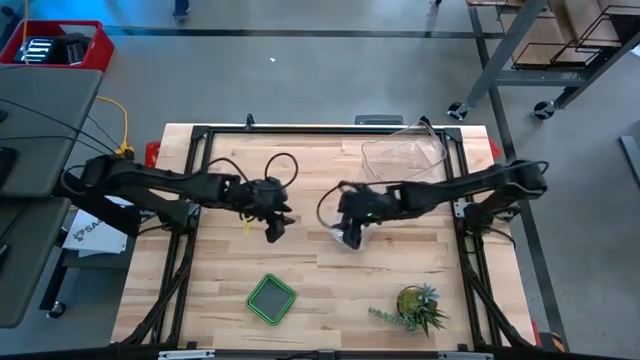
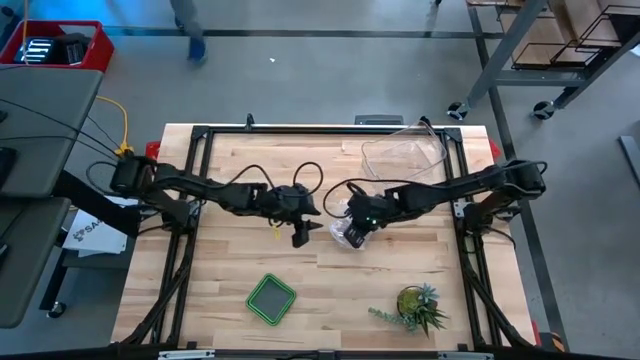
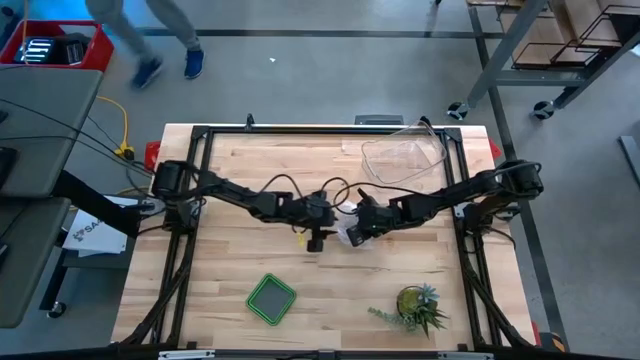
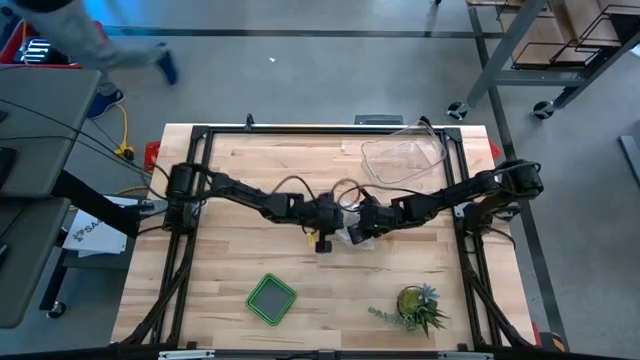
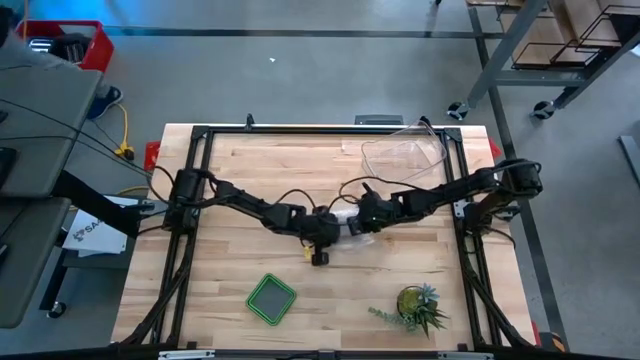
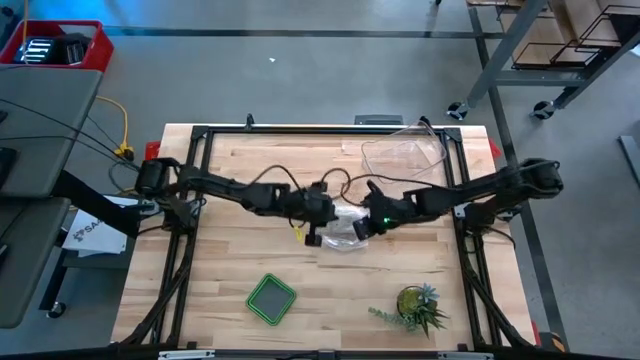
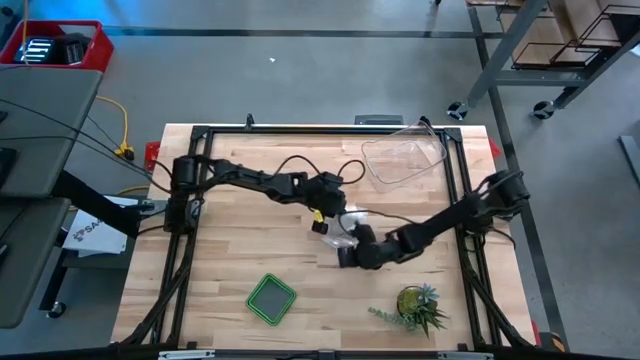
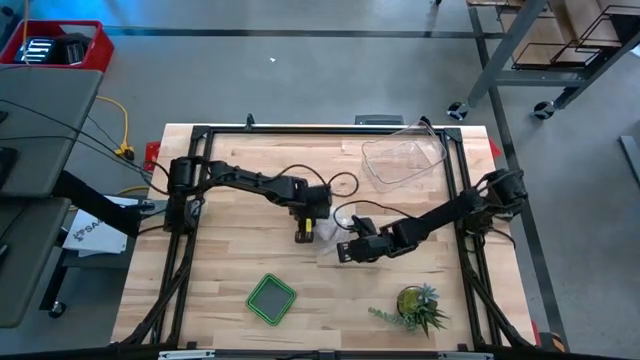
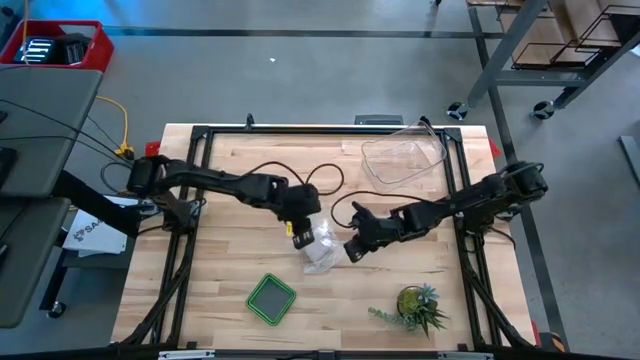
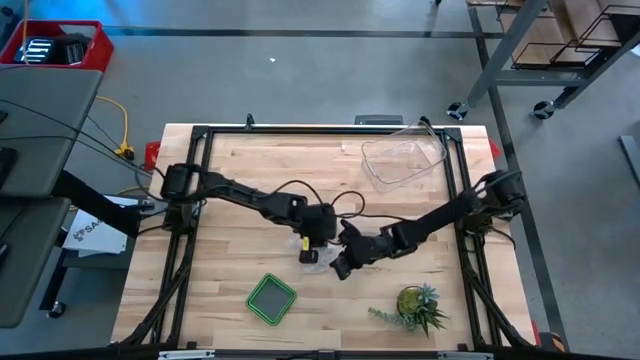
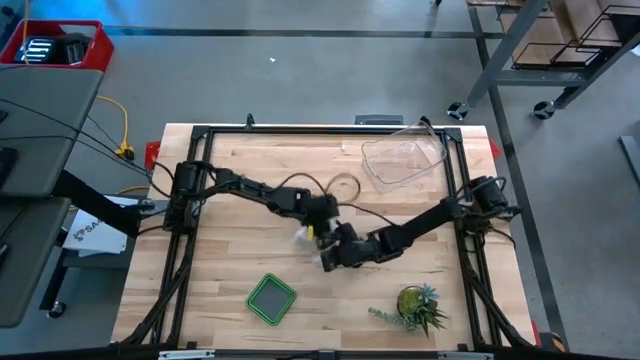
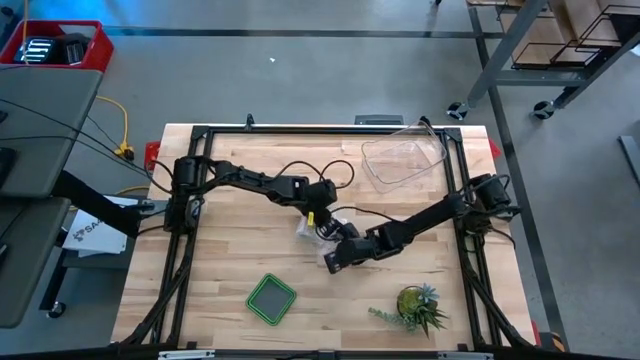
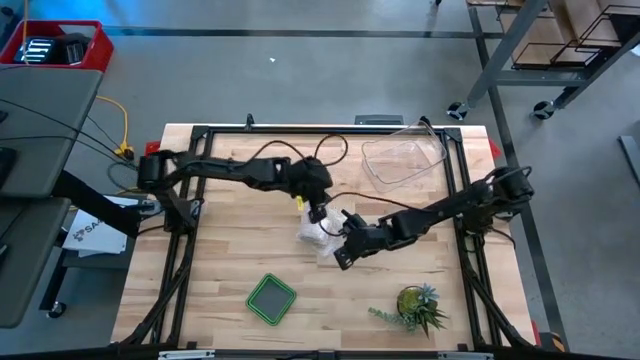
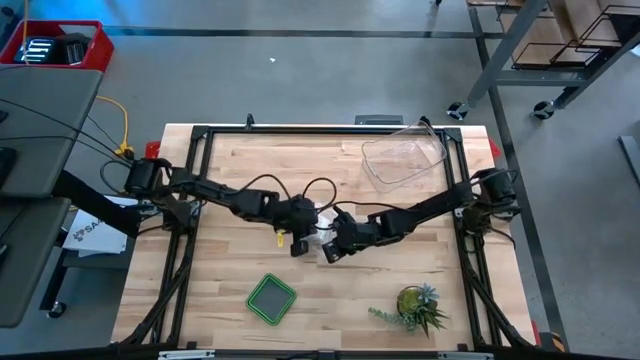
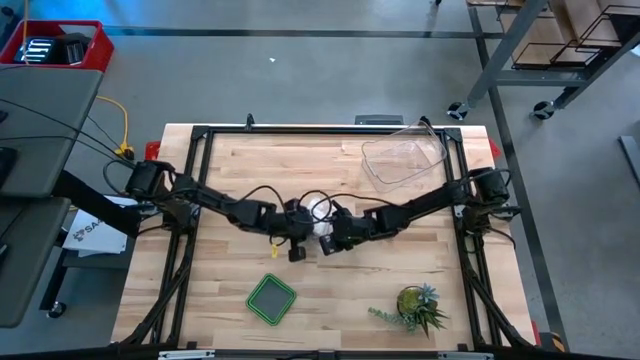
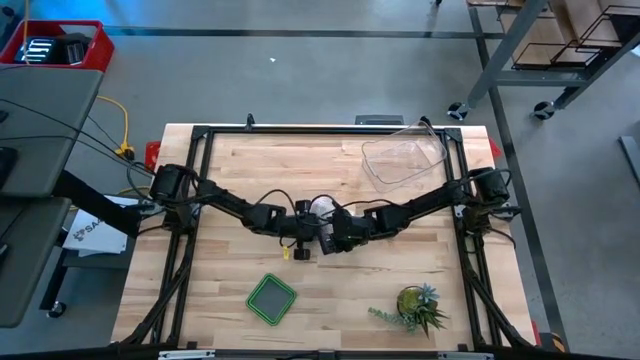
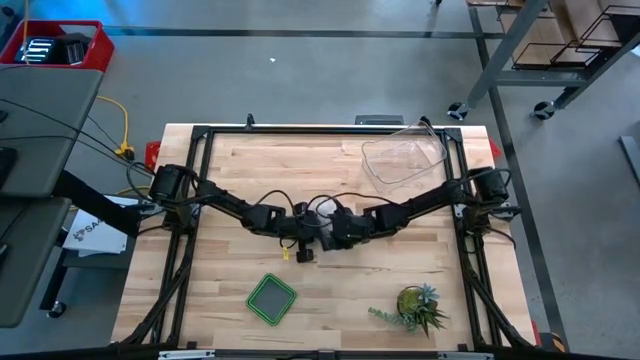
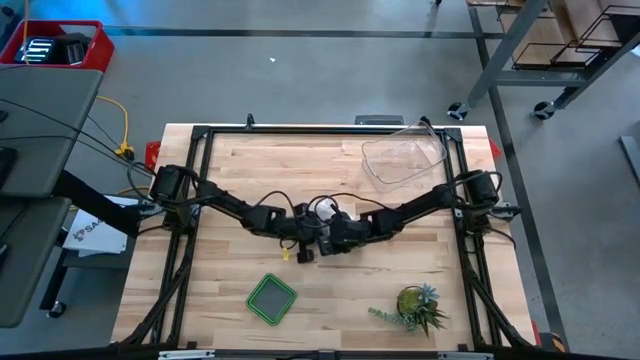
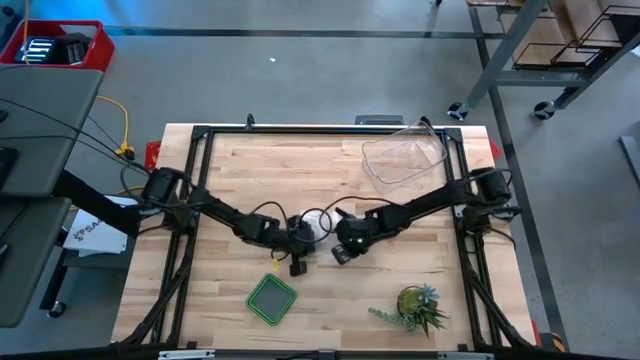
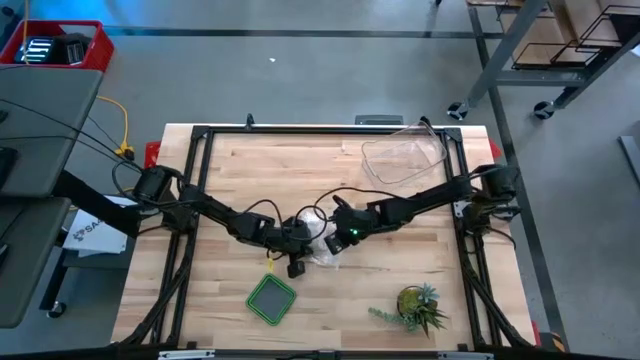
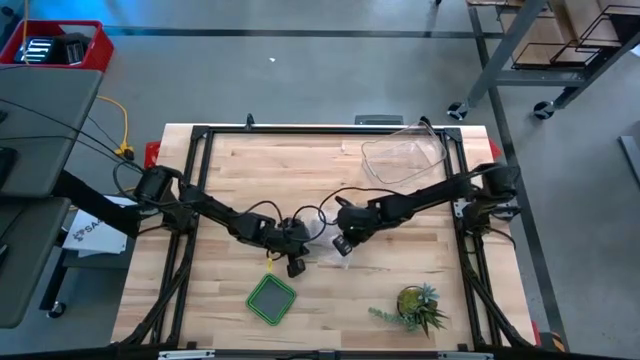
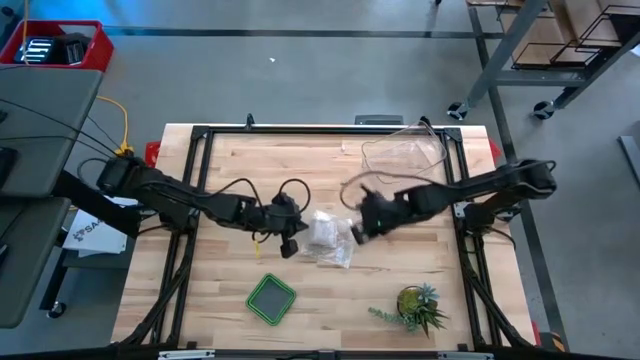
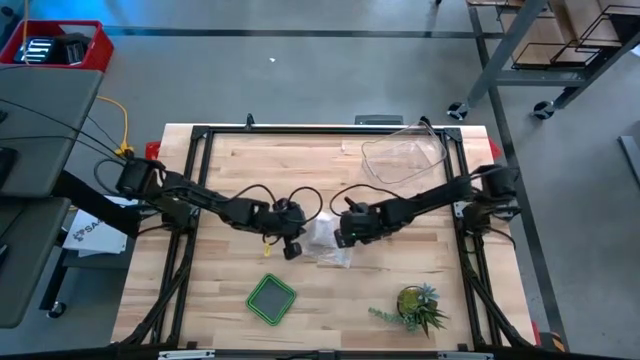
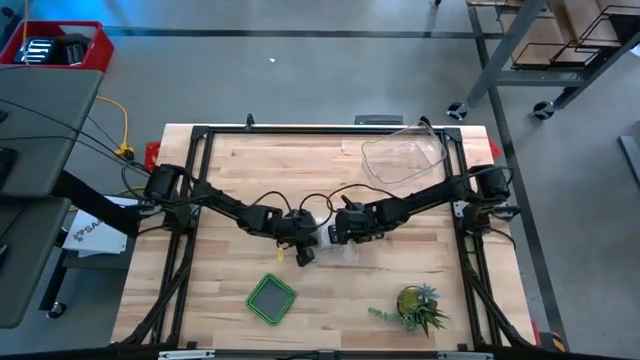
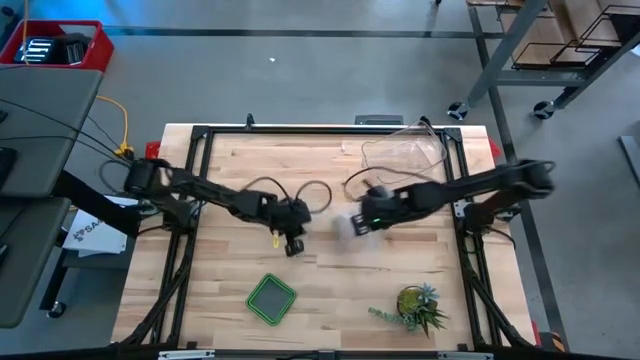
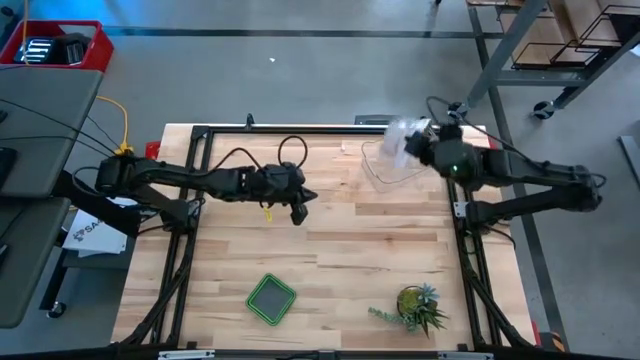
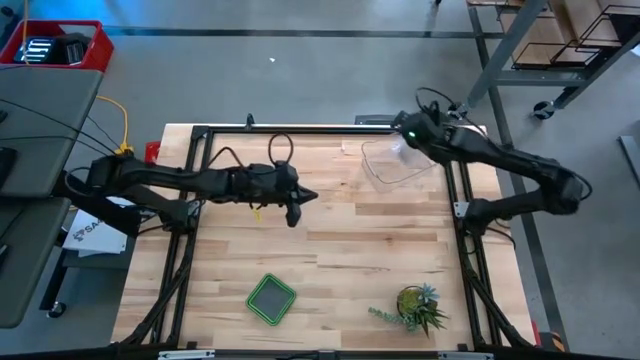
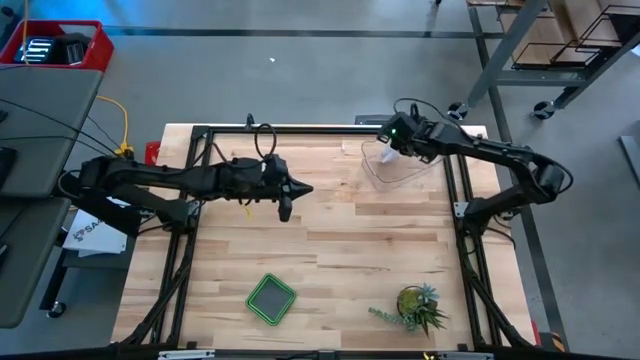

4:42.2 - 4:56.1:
Task: Roll bandage
Put the packed rolled white bandage into the transparent bin

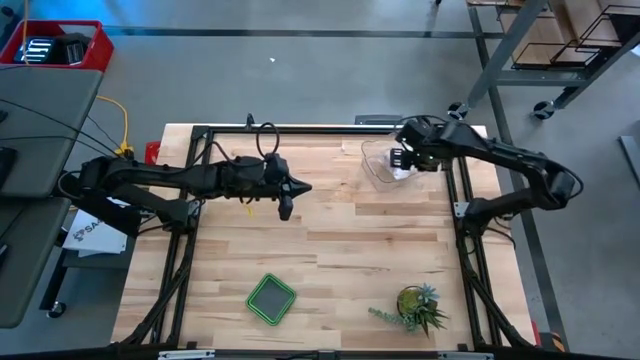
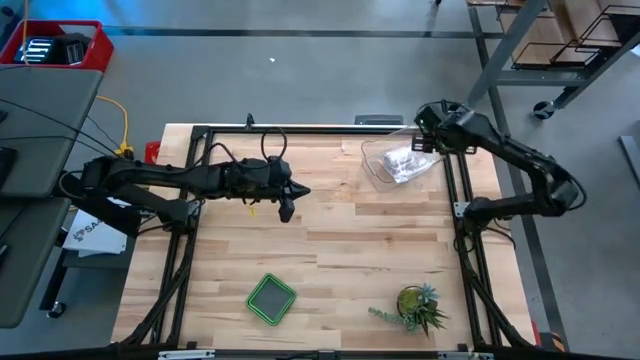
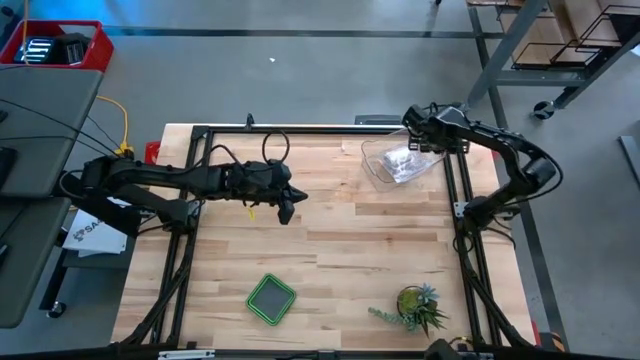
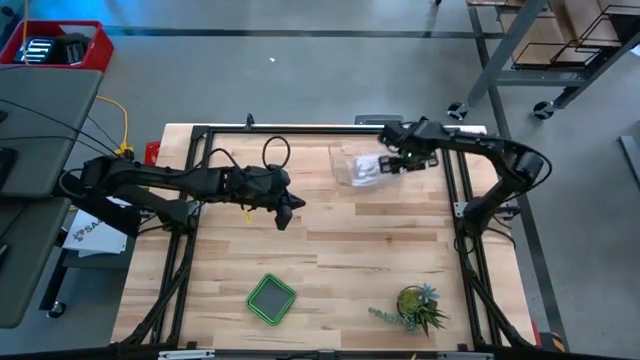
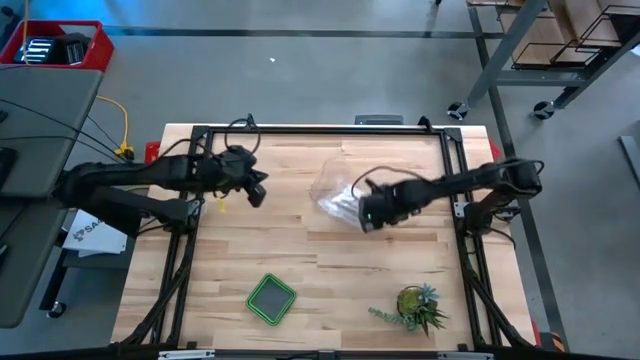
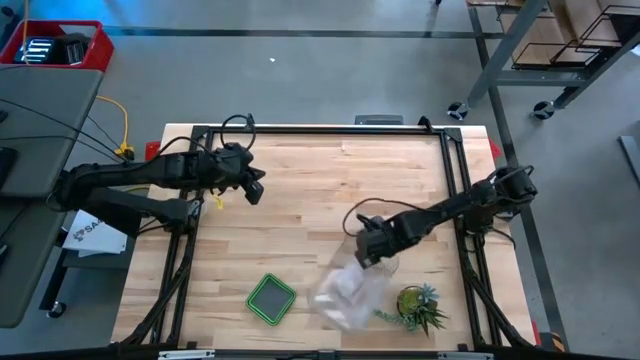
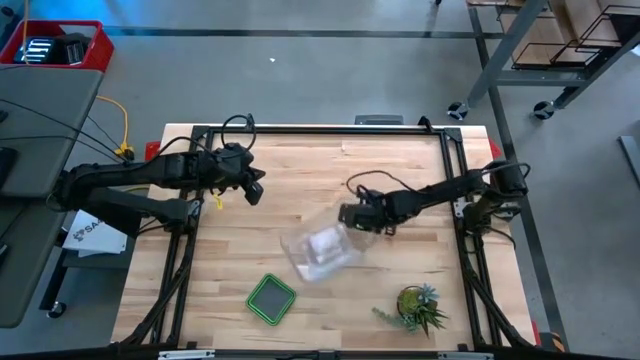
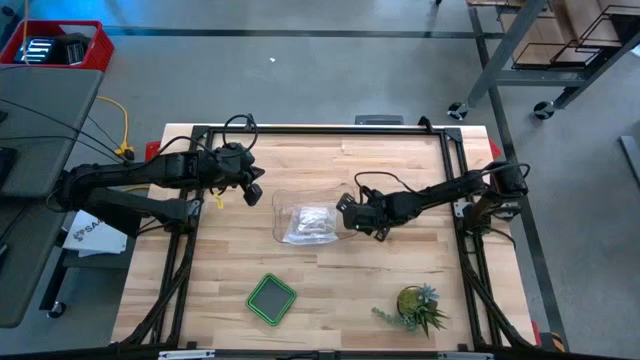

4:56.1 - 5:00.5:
Move the transparent bin to the center of the table

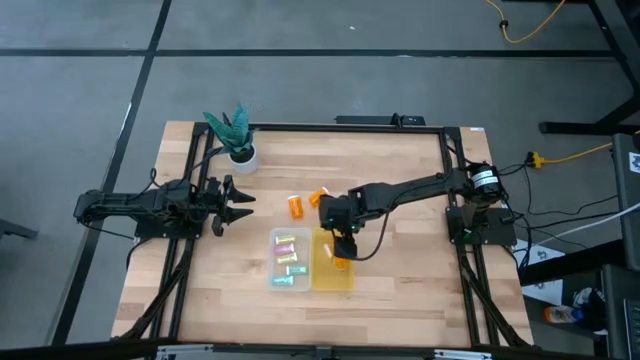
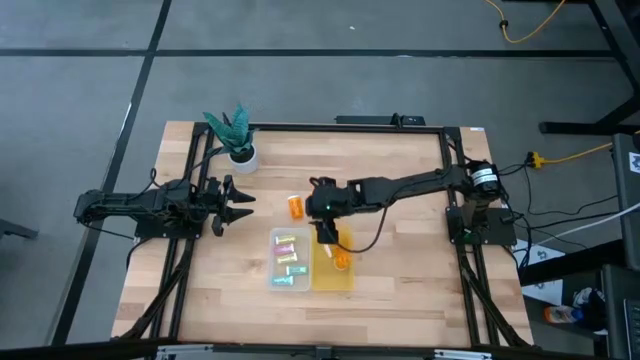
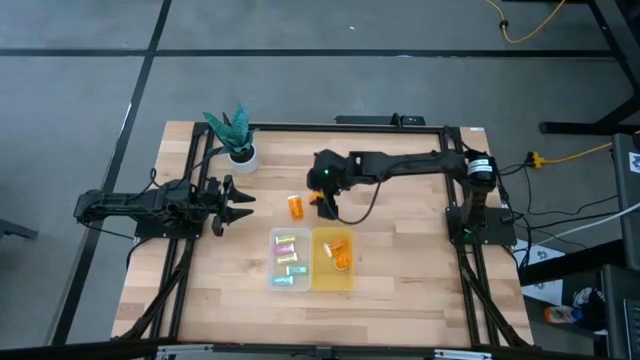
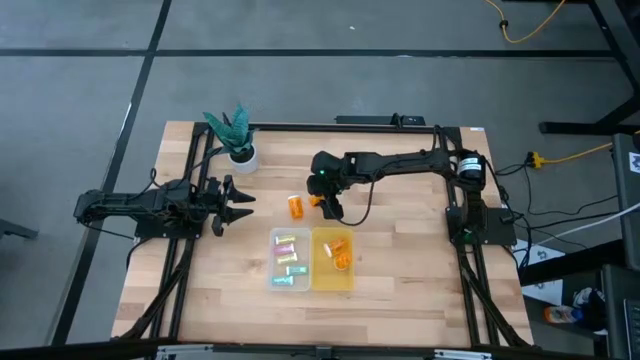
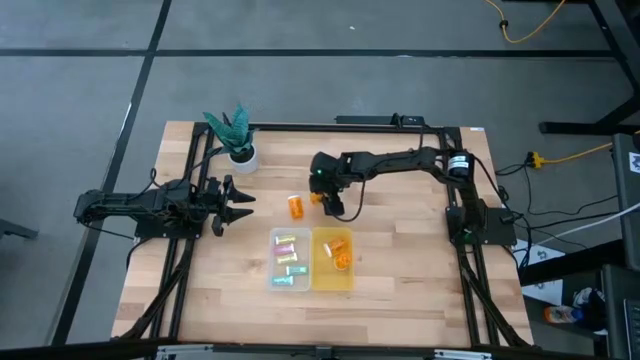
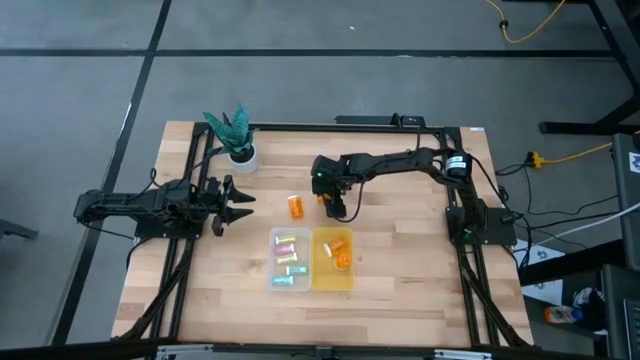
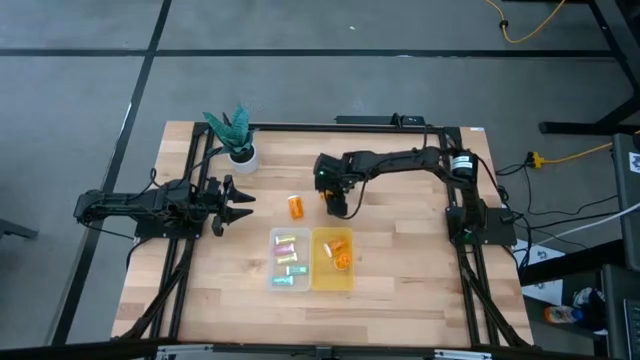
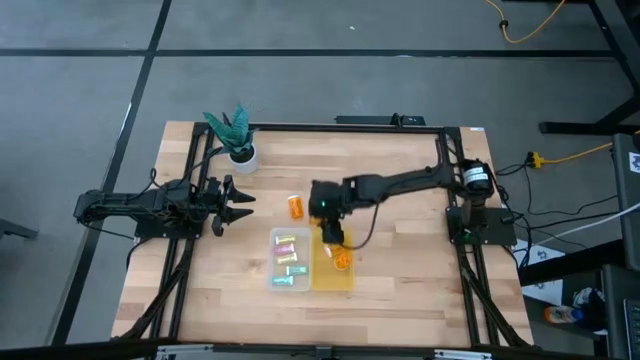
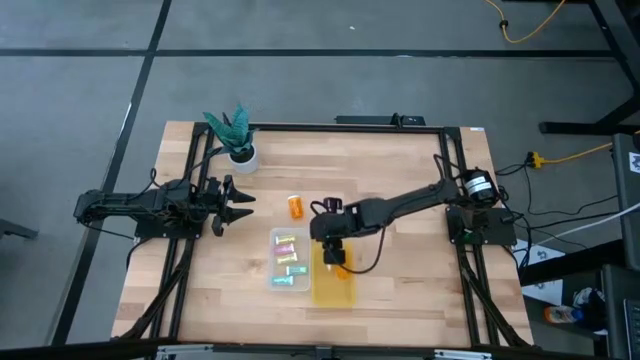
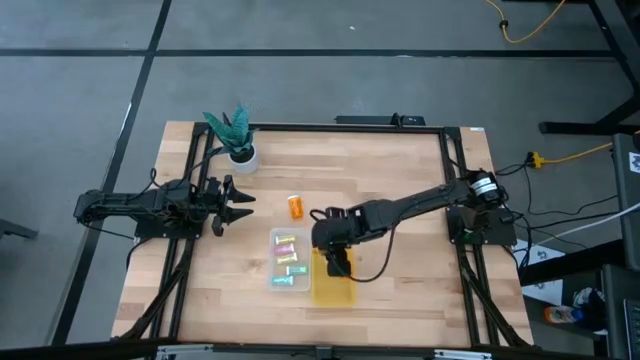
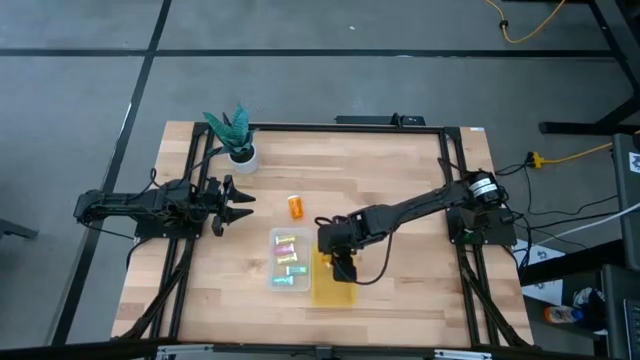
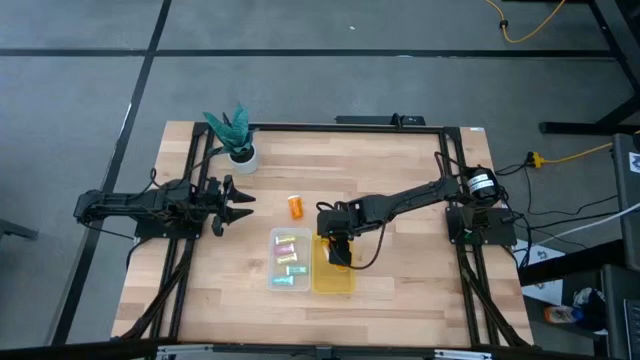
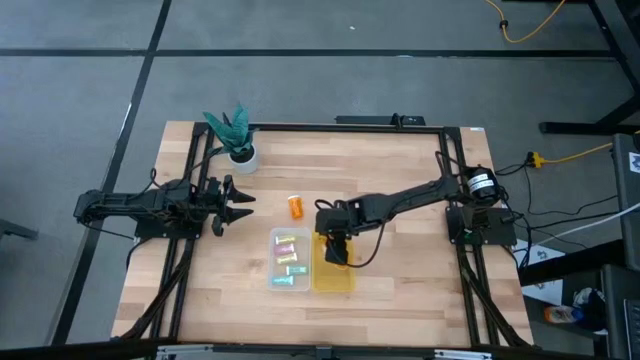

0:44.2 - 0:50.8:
Task: Pick and place medicine bottles into bin by pill shape (circle, oval)
Put the orange capsule bottle into the yellow bin
